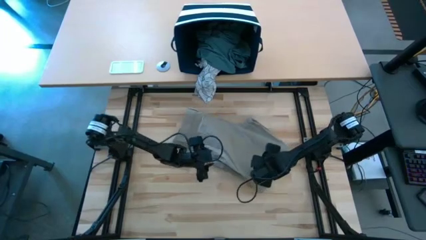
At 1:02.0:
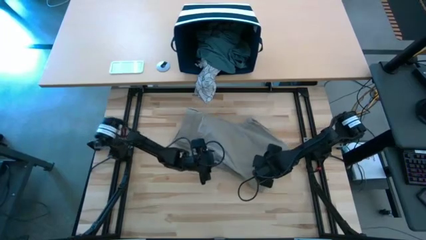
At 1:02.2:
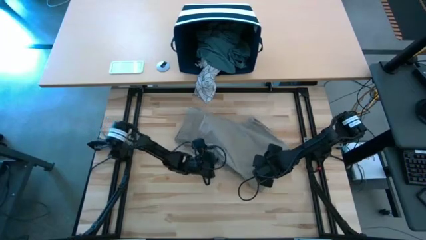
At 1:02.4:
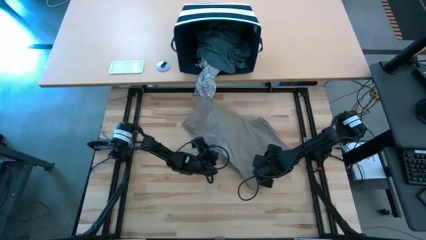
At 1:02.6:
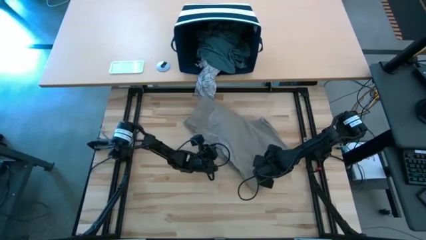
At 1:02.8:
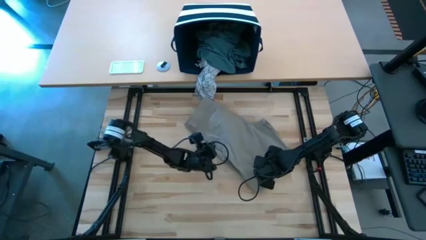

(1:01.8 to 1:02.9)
Task: Fold Laundry from Bin
Fold the brown shorts from the blue laundry basket

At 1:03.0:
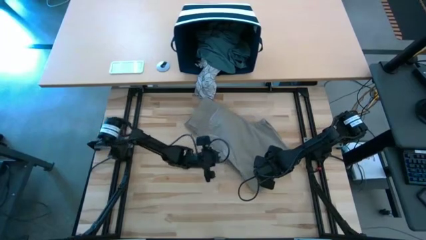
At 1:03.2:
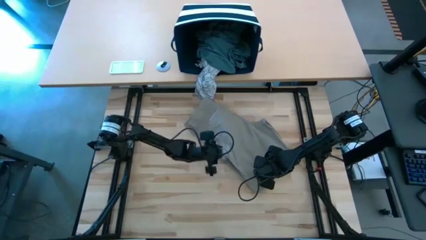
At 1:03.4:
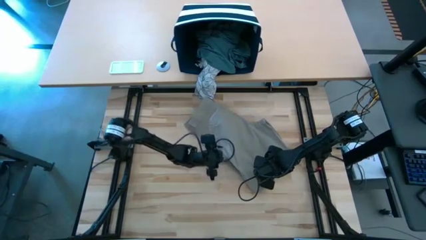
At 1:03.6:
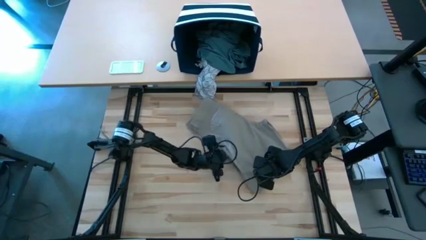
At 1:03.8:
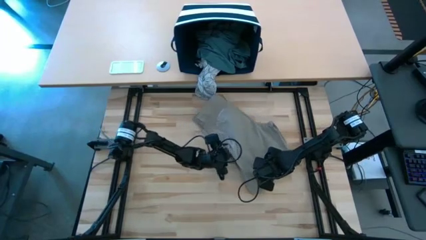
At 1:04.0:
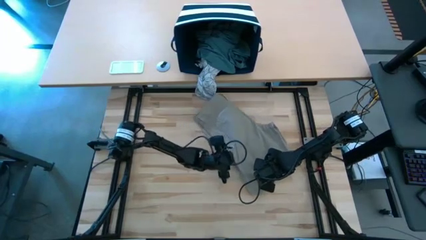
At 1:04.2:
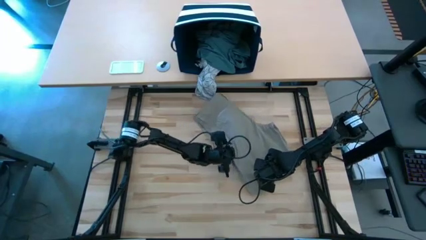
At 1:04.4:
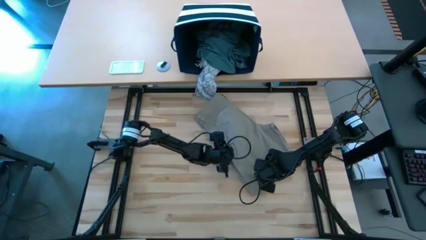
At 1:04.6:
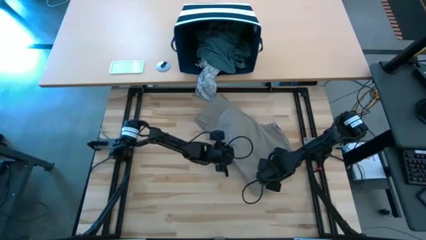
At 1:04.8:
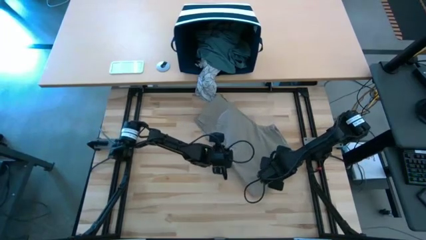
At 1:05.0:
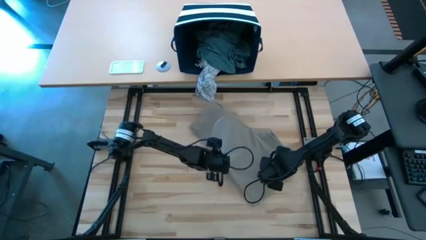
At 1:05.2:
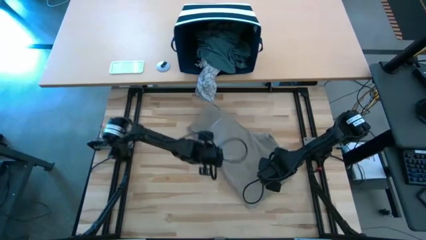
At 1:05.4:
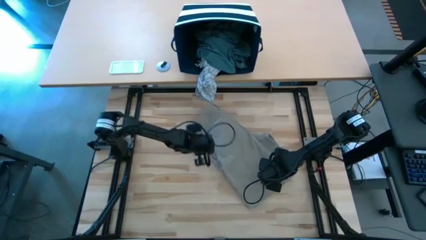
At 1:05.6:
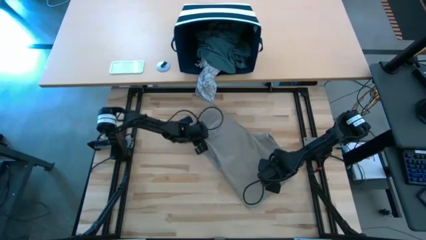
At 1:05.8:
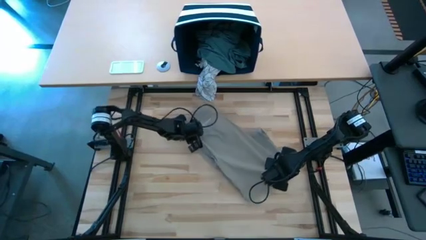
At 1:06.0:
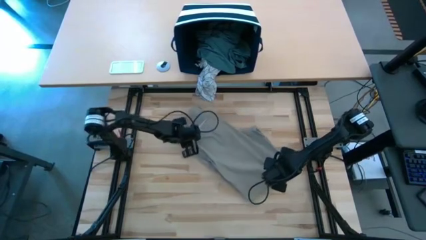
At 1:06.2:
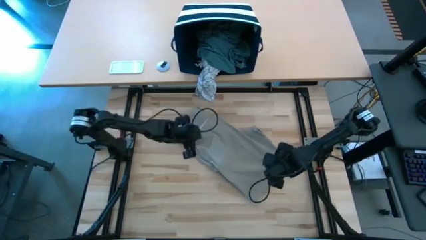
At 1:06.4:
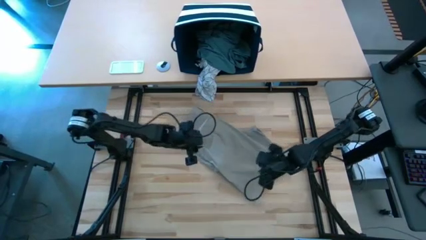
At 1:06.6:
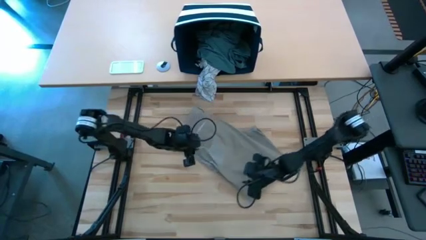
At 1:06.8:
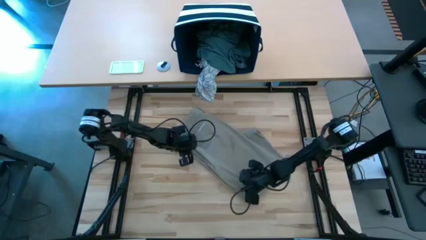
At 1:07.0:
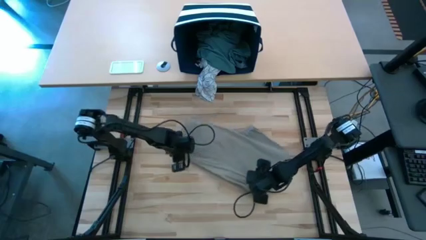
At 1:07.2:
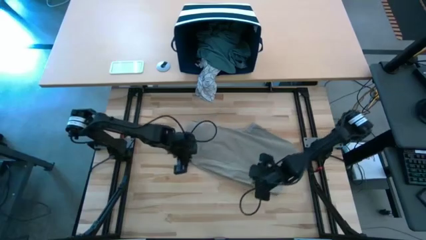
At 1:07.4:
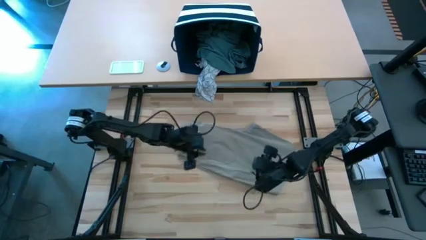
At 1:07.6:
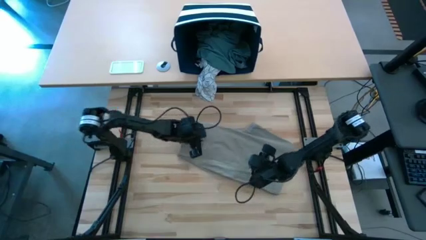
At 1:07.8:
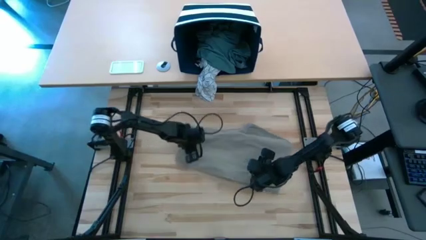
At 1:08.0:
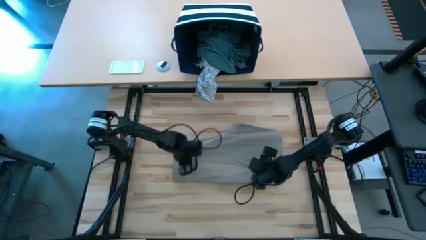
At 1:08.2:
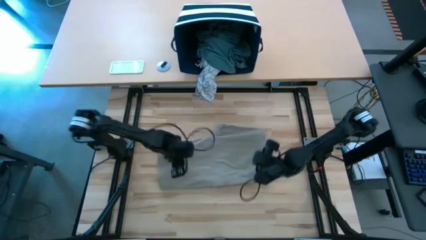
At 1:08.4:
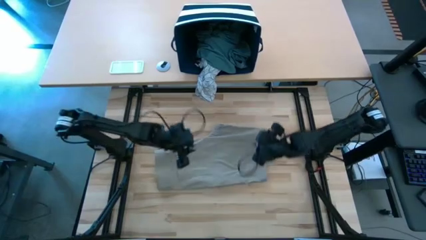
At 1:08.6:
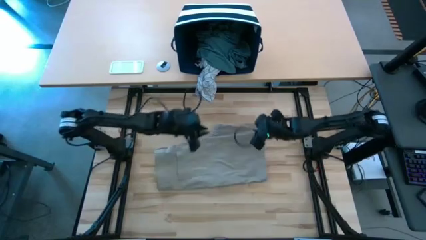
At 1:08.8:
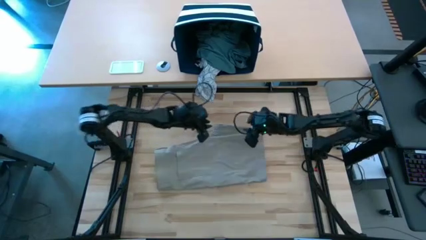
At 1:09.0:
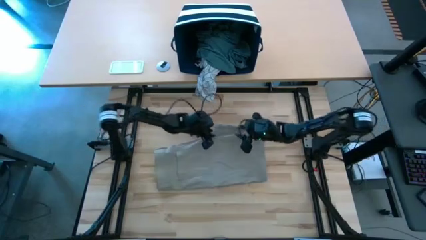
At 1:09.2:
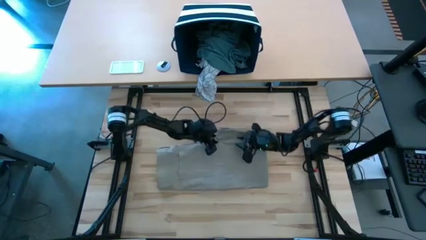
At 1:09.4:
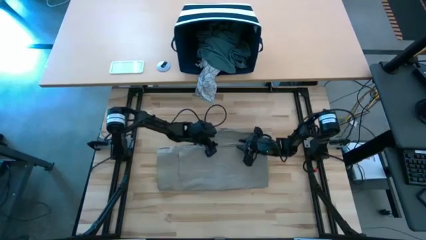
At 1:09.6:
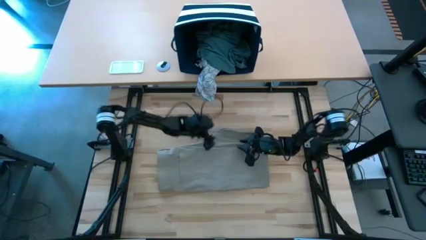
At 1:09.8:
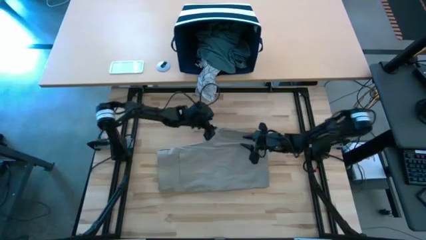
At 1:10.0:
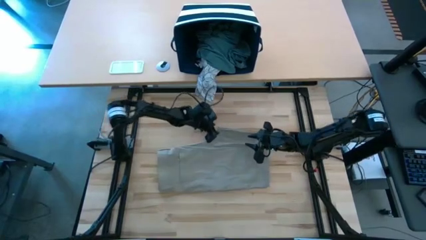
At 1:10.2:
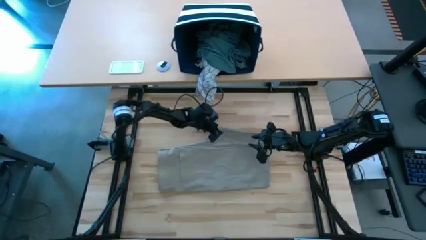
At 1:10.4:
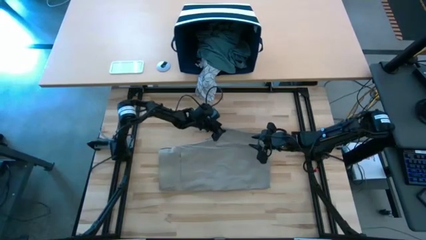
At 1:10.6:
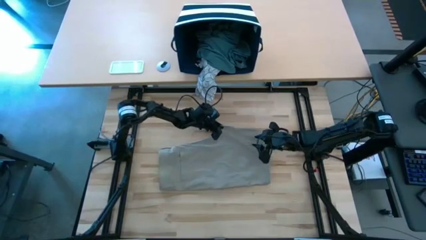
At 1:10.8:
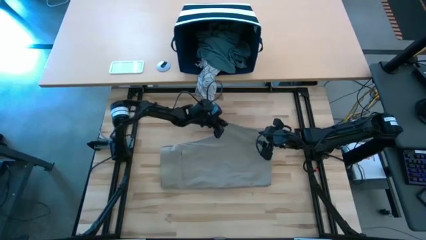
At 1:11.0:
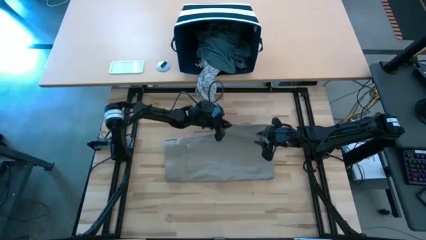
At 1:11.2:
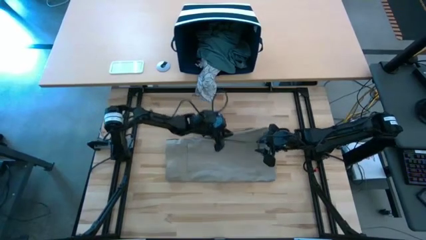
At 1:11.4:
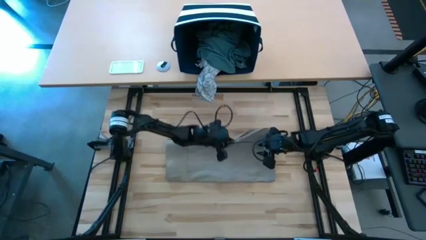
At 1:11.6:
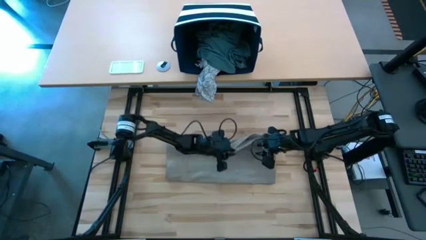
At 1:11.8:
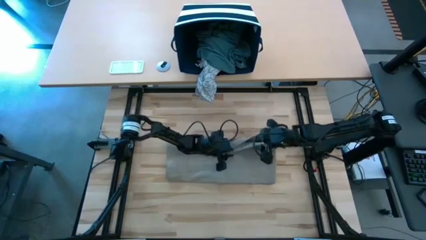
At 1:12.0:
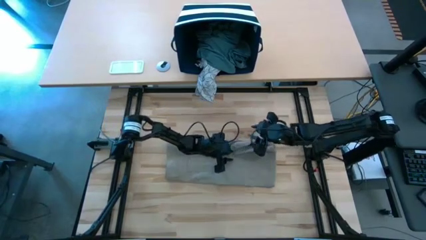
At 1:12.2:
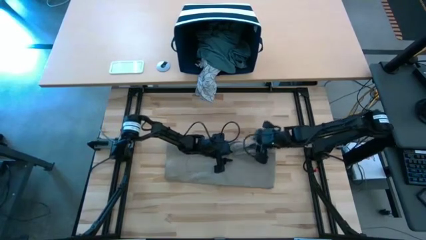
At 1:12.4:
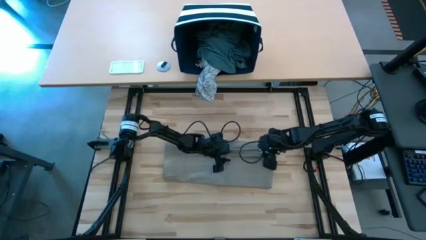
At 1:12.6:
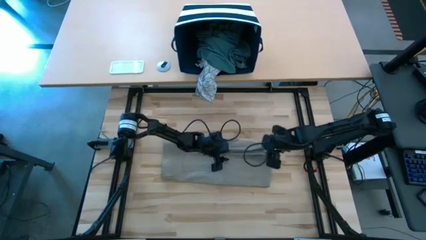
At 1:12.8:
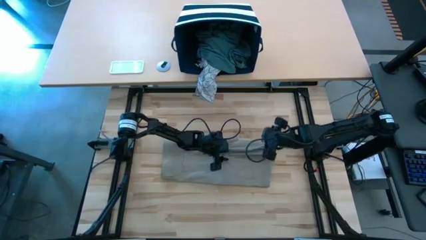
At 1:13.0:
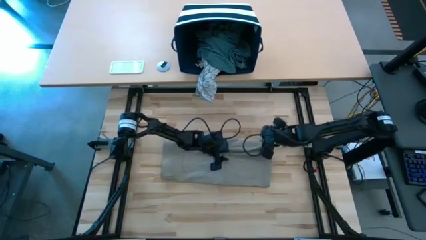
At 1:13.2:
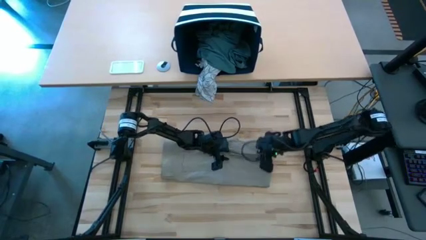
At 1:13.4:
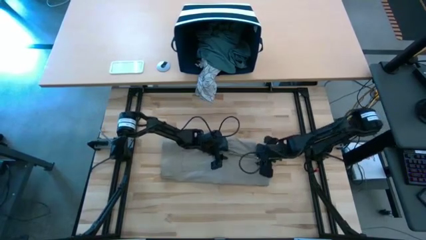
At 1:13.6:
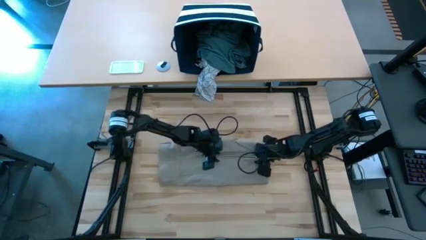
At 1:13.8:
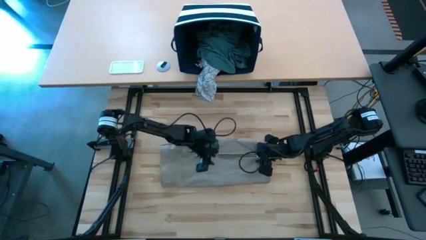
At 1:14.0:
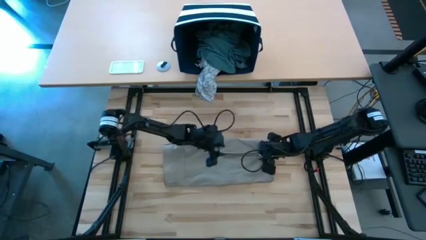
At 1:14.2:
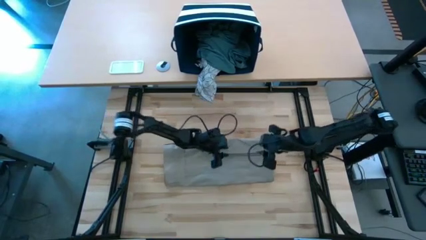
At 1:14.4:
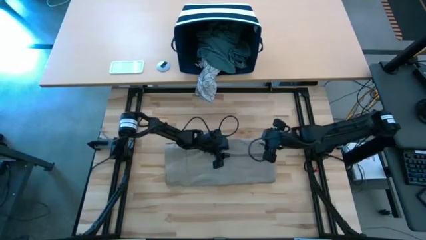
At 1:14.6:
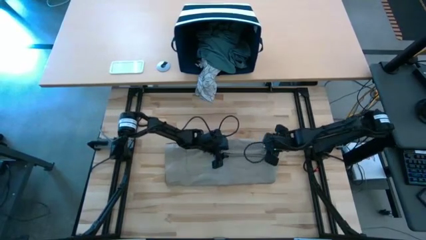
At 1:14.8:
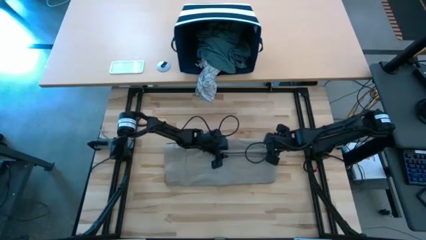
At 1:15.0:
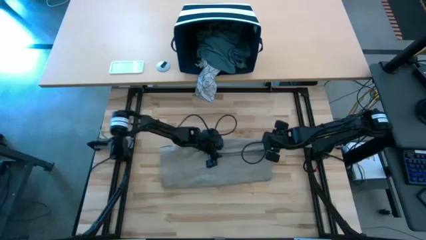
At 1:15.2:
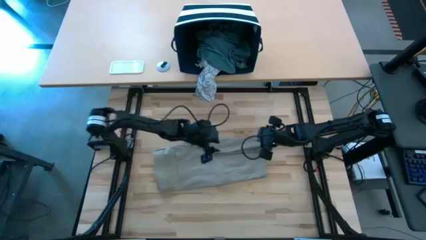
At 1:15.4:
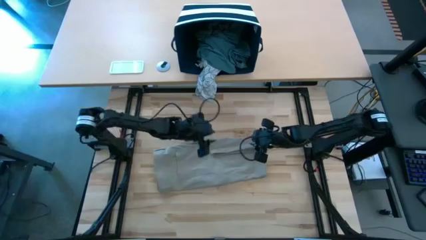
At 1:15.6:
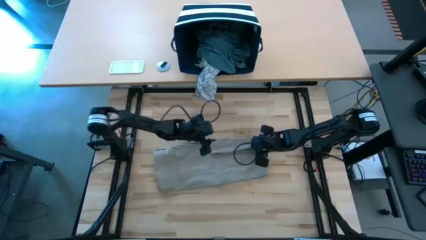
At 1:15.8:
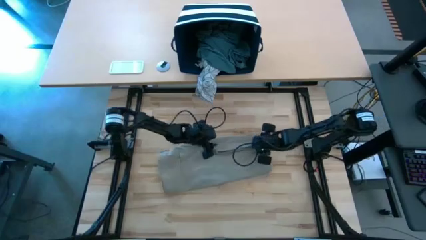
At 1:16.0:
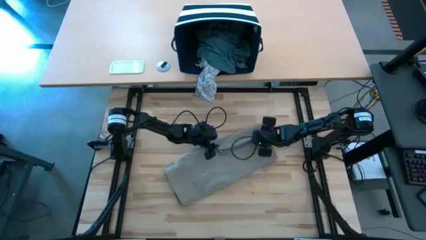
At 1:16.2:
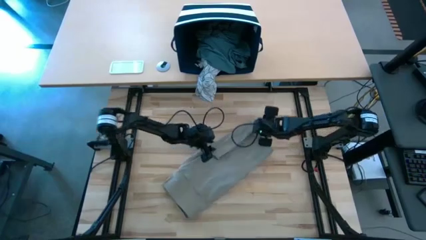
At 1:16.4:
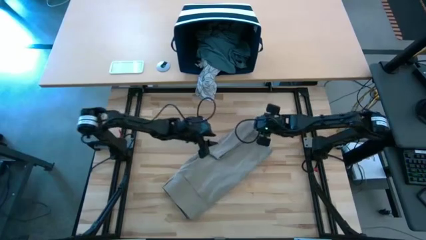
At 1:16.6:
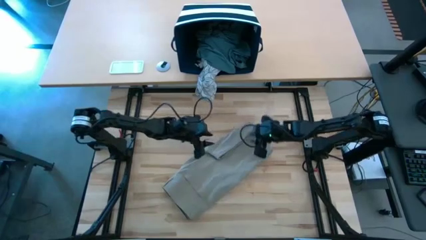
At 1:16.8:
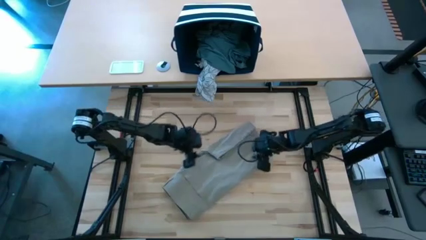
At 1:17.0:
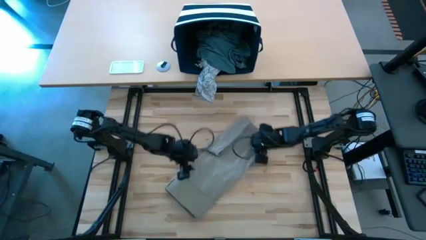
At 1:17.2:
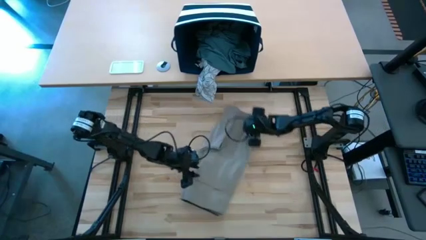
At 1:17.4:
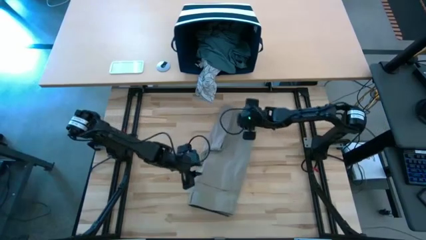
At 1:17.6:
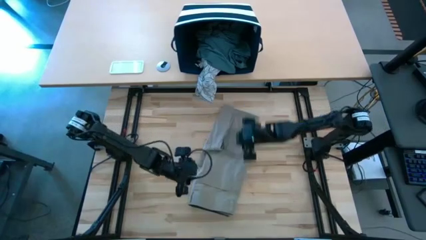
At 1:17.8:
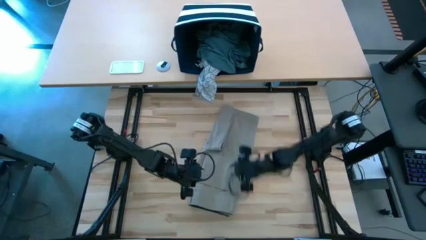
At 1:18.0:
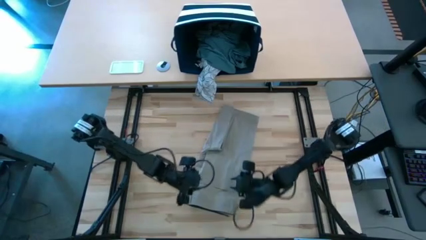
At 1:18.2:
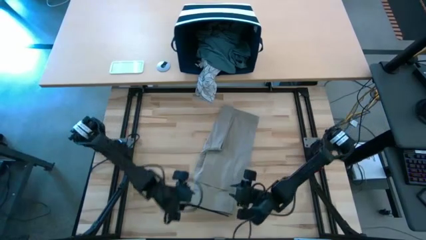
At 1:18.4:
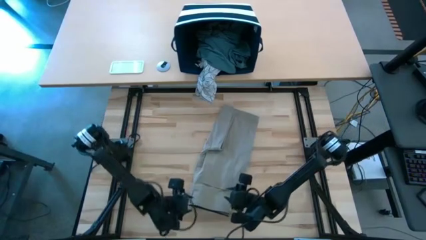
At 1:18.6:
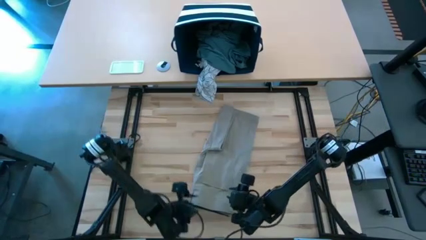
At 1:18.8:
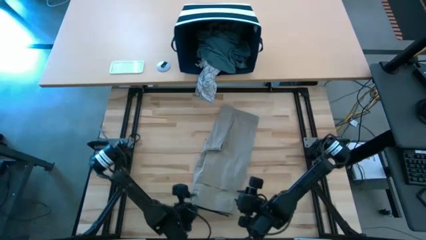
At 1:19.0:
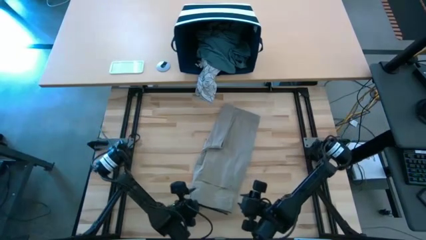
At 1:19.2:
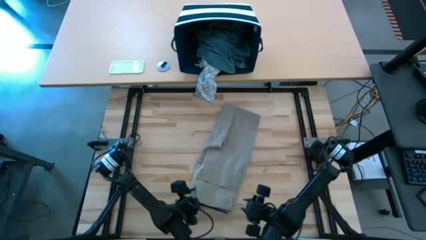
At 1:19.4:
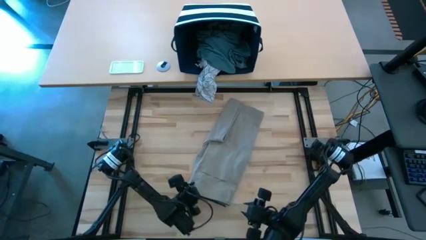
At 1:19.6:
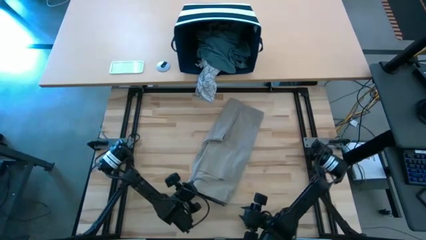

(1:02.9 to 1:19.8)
Fold the brown shorts from the blue laundry basket
